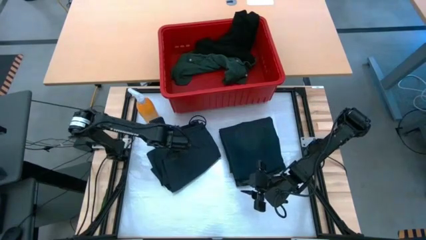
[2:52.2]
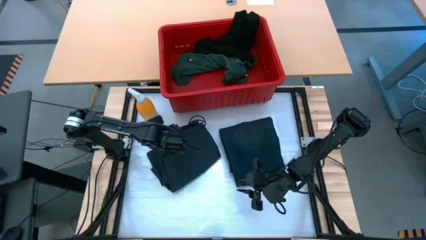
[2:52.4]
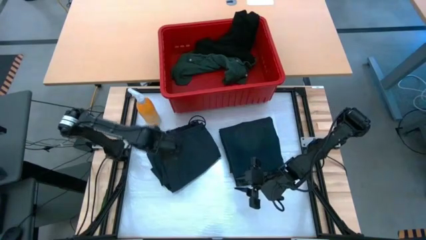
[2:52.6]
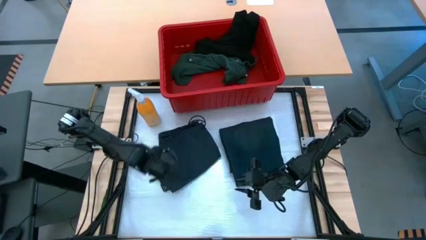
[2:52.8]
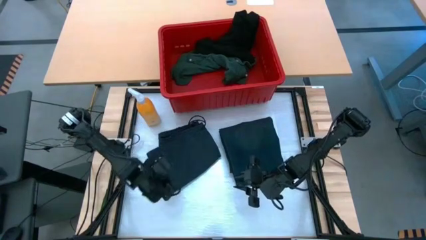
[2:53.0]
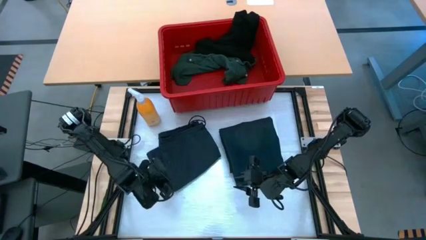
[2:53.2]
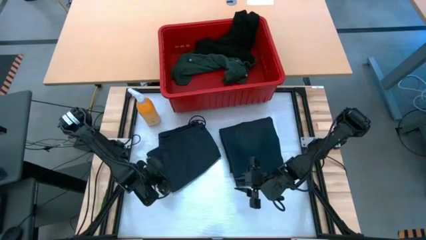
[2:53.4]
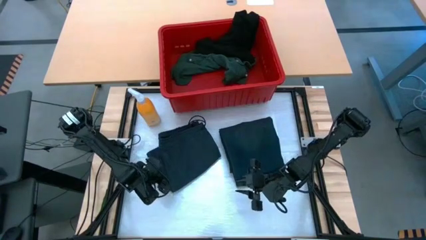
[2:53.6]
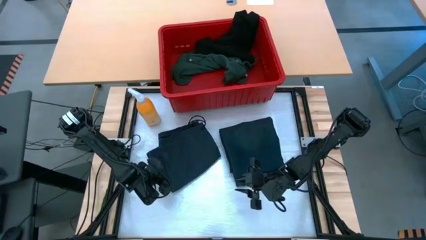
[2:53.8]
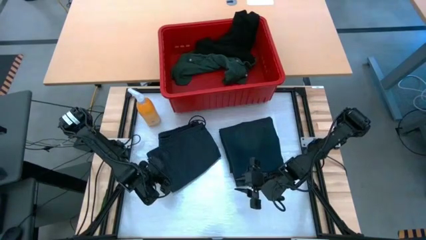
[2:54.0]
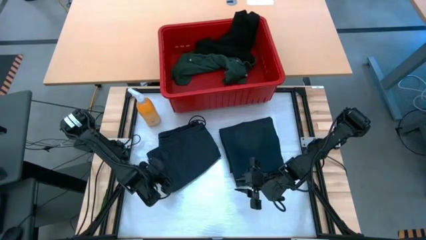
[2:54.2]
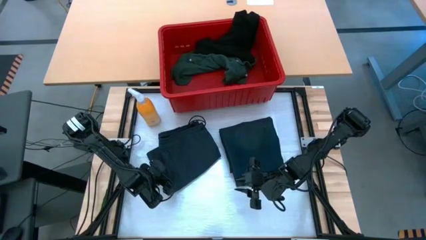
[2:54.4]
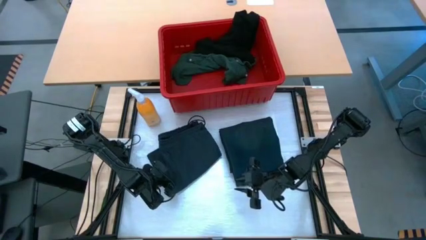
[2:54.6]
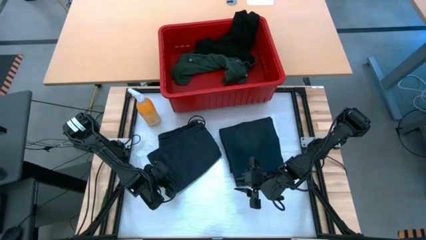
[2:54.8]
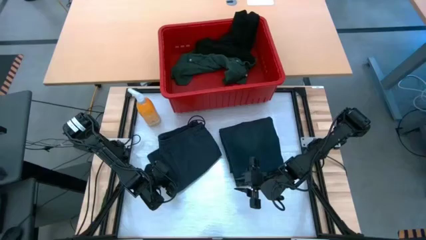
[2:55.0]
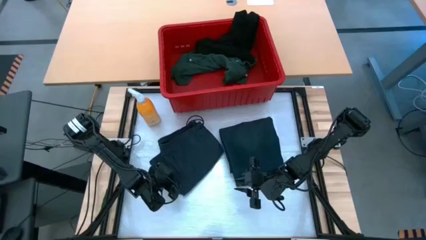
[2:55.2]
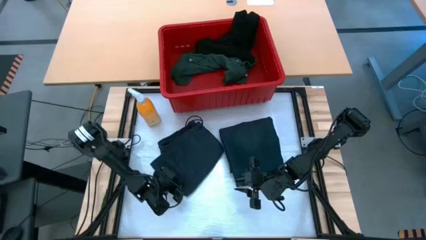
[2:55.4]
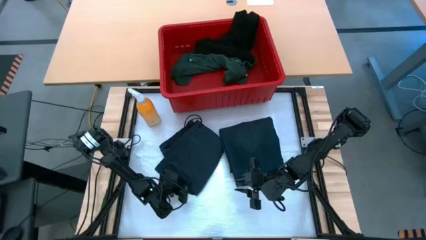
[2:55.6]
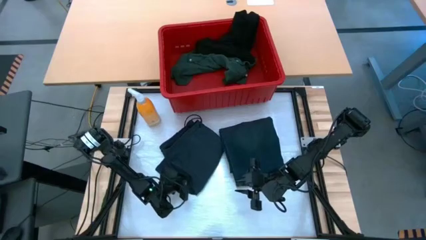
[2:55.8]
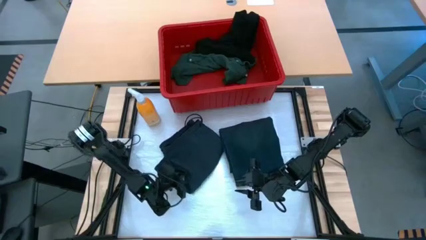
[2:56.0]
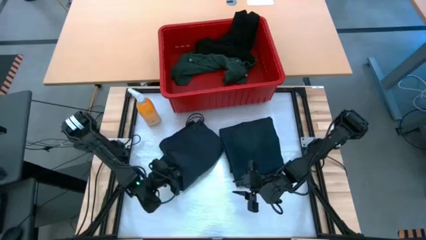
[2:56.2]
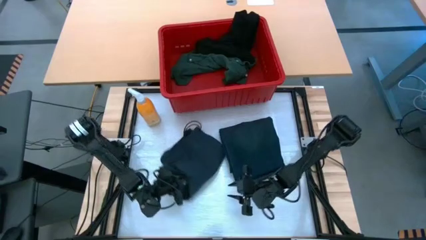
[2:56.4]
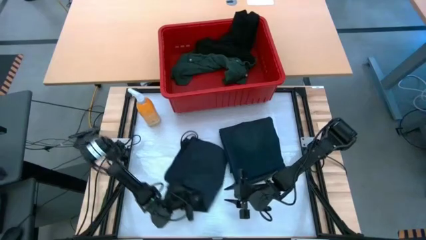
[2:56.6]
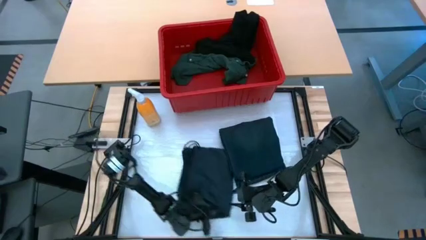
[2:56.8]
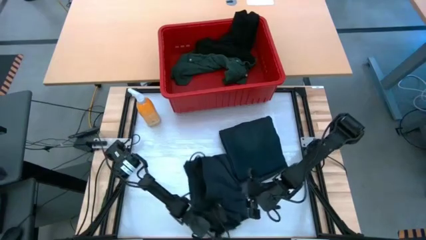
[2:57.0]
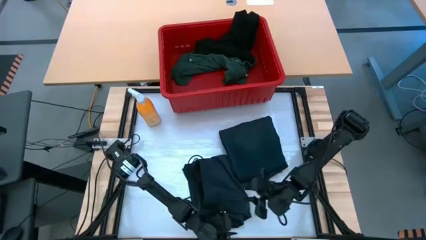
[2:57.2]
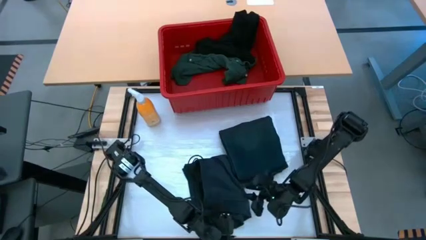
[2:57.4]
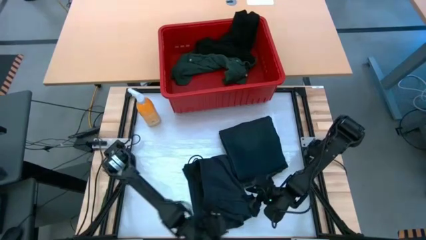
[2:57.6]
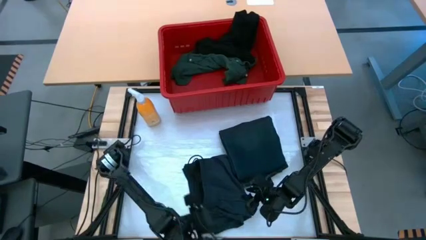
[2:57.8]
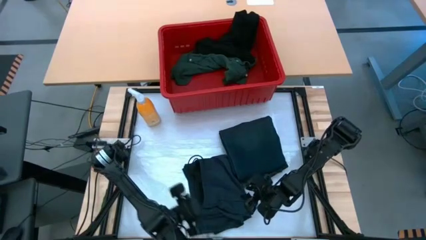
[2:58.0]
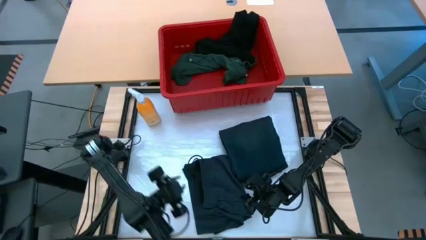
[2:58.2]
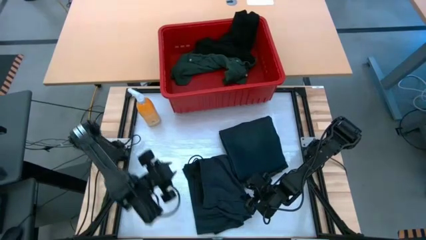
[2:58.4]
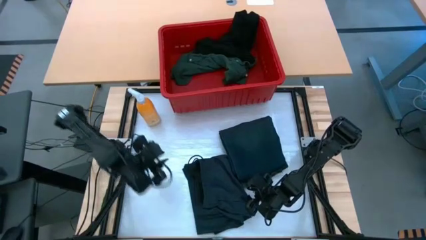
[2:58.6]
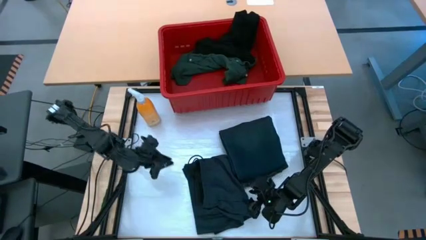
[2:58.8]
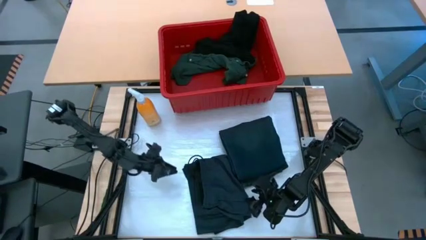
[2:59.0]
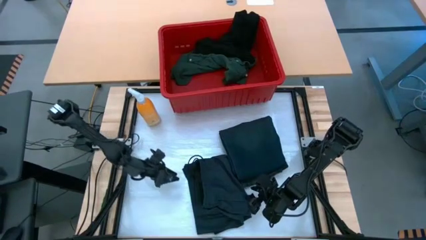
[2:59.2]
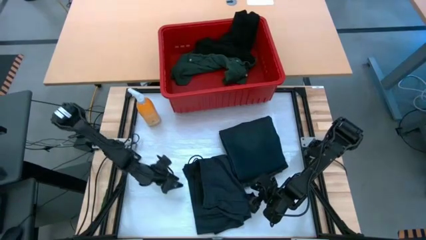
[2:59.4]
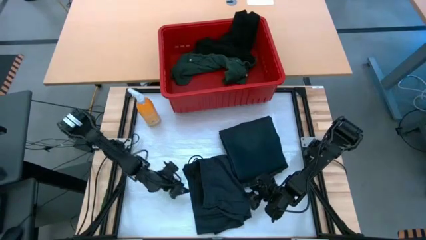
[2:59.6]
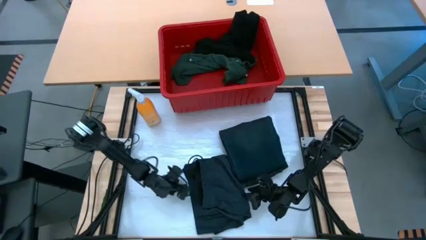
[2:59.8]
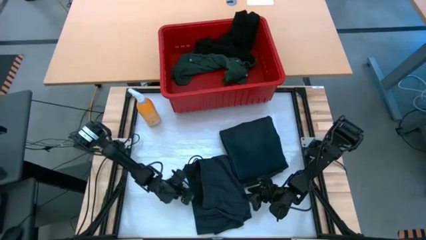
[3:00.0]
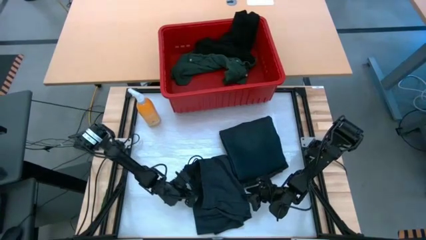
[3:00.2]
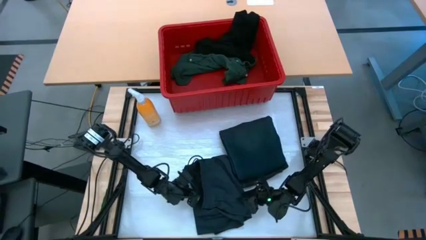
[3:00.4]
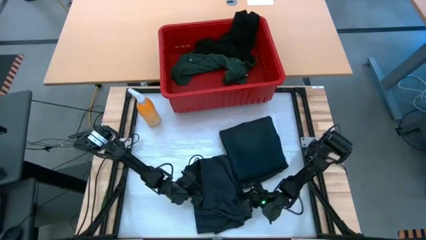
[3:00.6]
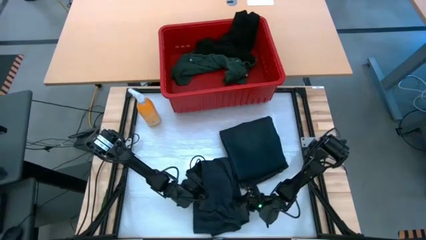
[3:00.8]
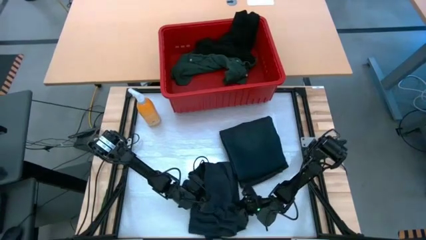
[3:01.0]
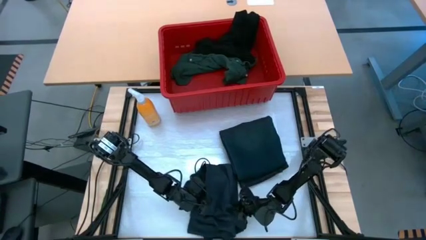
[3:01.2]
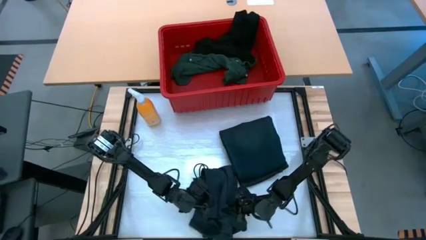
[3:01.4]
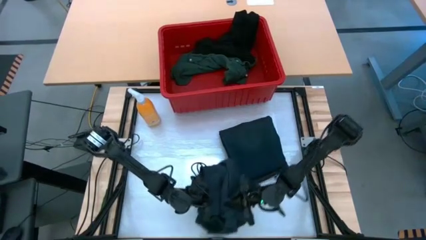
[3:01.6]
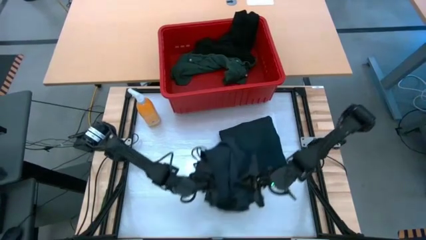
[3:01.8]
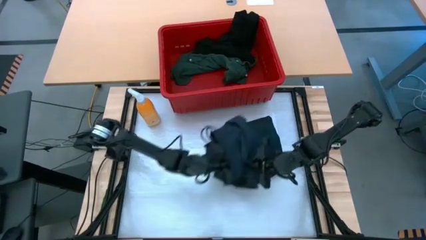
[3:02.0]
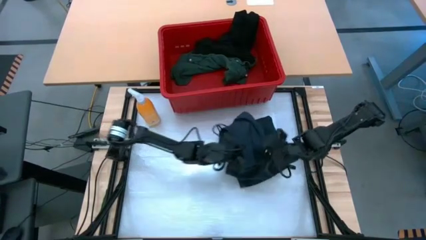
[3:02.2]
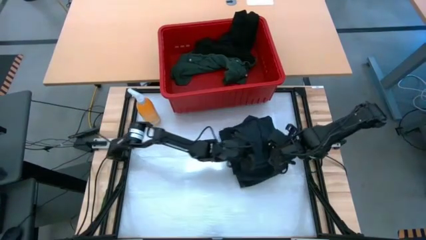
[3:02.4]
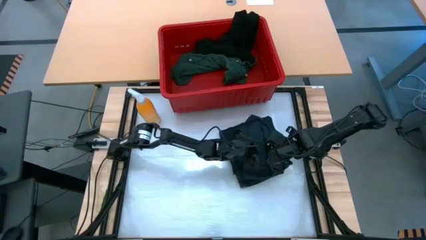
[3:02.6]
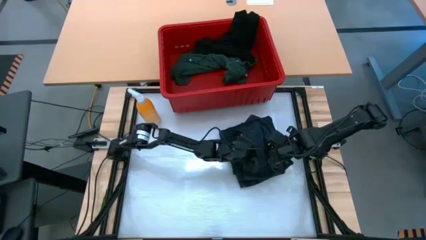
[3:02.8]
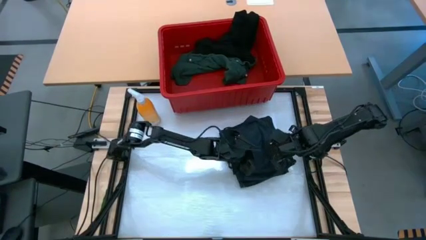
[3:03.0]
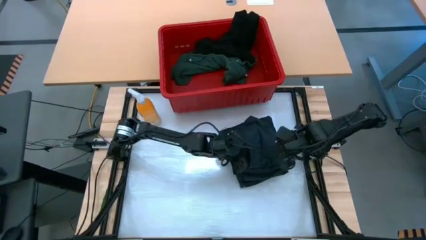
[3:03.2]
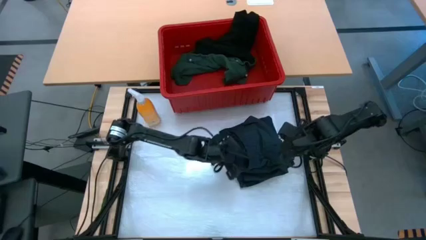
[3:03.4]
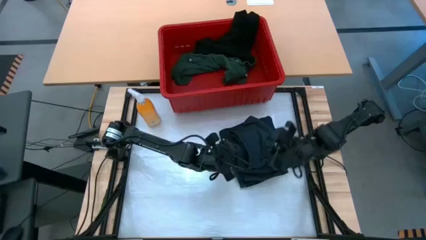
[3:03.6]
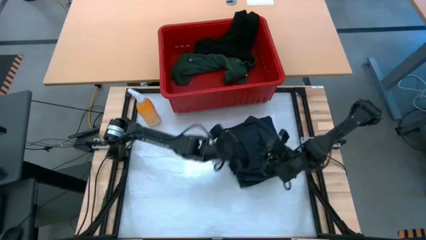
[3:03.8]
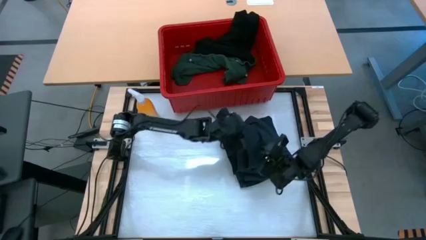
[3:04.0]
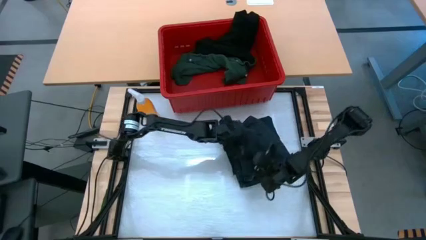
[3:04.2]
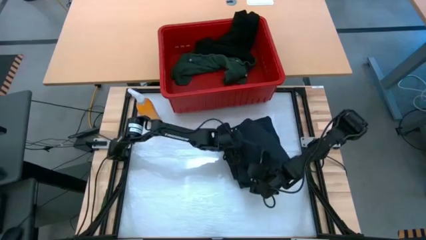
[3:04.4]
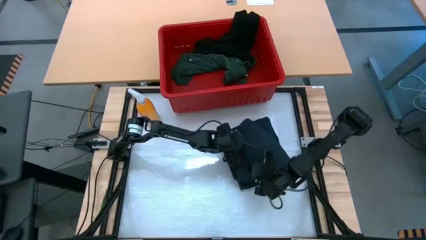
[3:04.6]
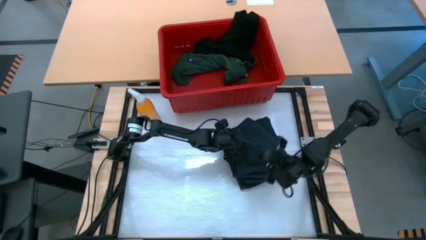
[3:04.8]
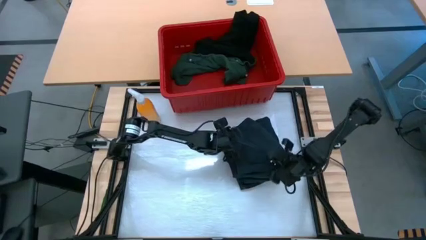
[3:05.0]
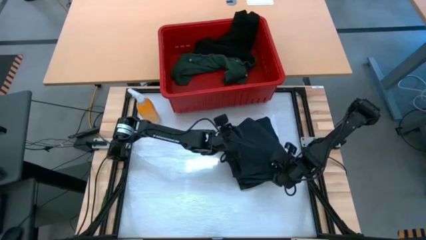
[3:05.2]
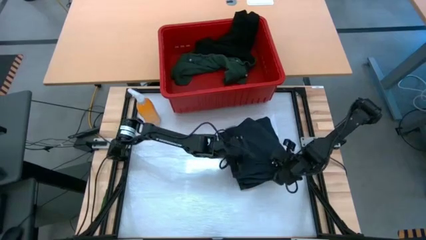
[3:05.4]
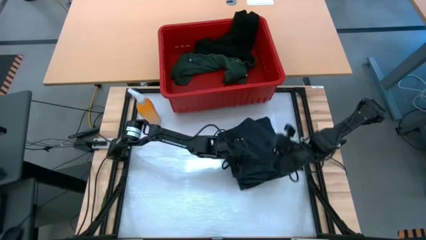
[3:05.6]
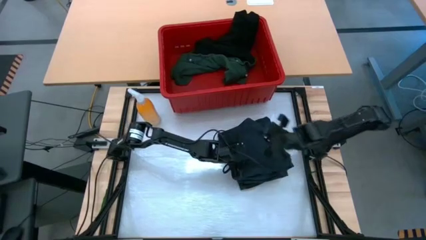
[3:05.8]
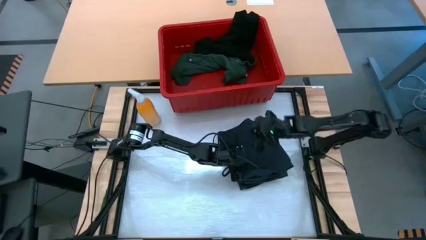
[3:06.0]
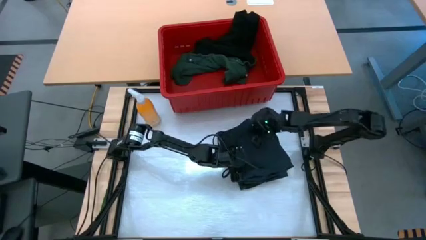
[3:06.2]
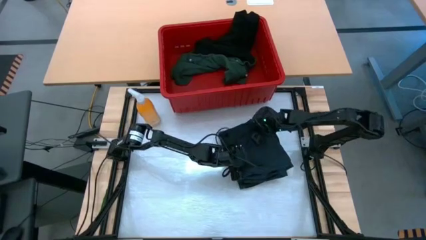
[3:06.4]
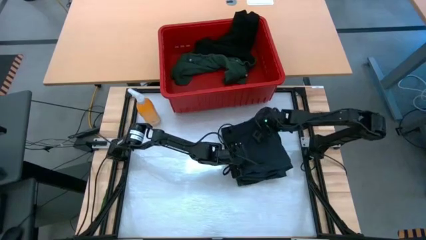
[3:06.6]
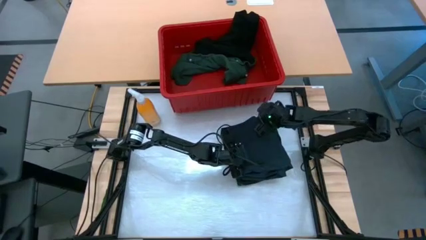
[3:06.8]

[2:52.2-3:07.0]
Task: Fold Laundry from Bin
Stack the dark blue shorts on top of the dark blue jeans
